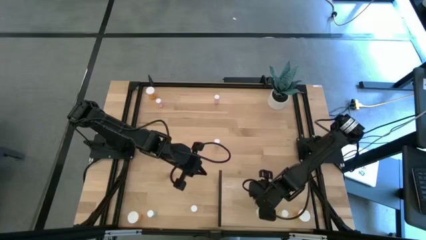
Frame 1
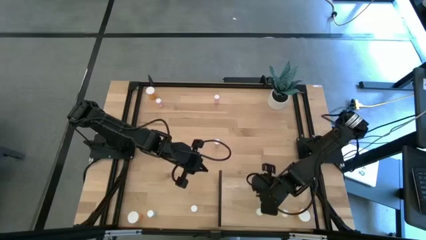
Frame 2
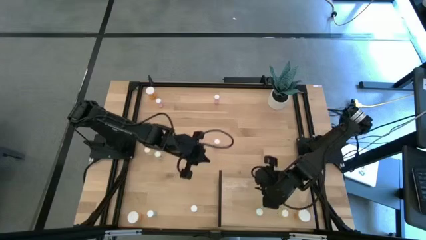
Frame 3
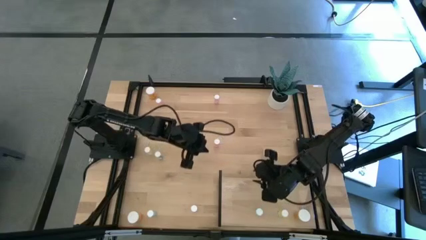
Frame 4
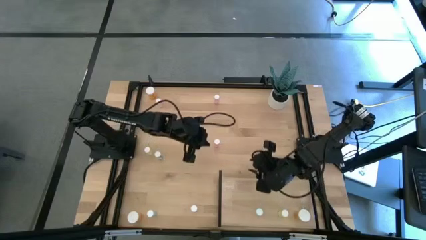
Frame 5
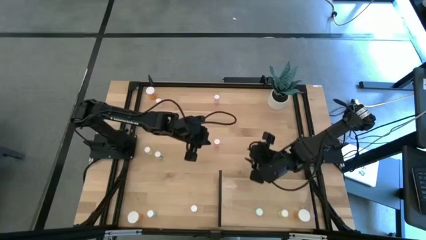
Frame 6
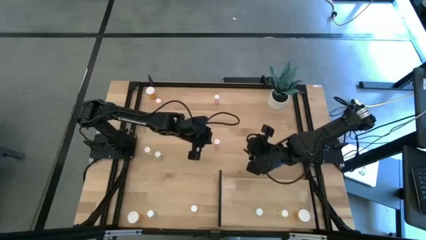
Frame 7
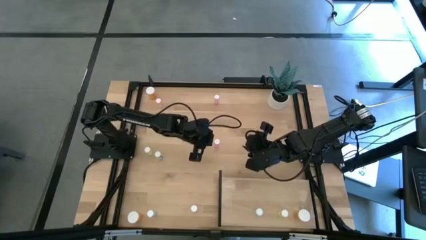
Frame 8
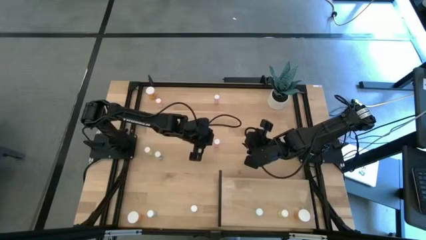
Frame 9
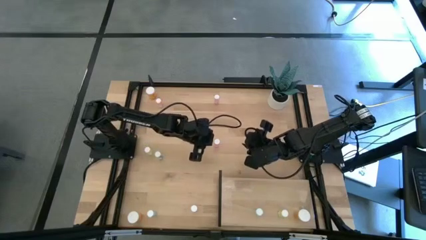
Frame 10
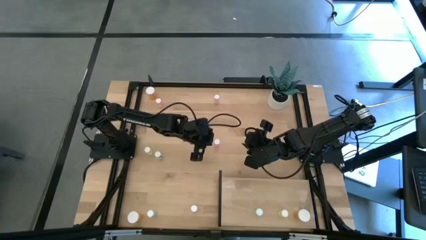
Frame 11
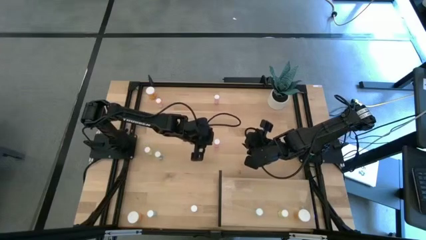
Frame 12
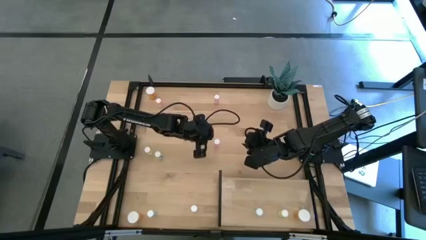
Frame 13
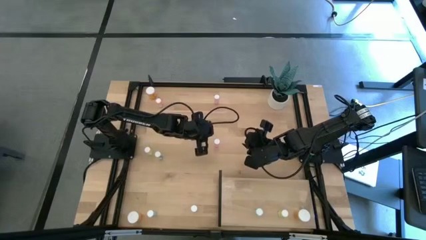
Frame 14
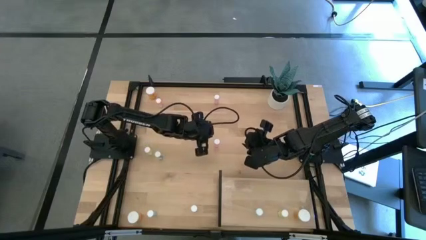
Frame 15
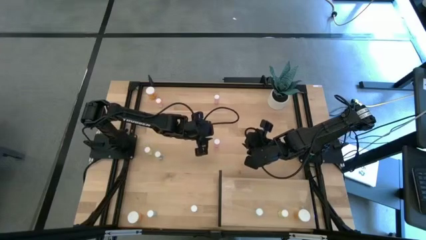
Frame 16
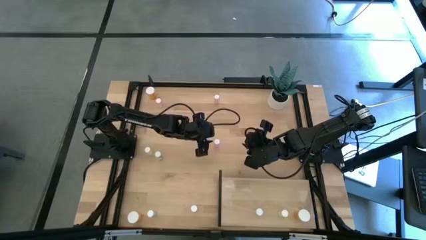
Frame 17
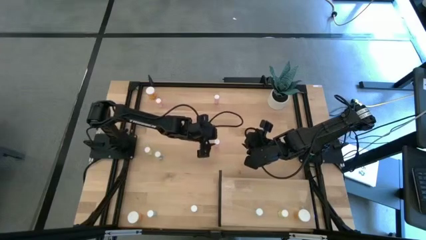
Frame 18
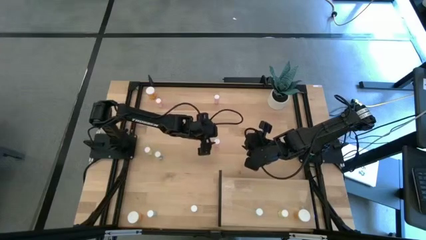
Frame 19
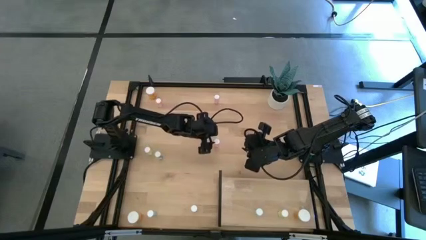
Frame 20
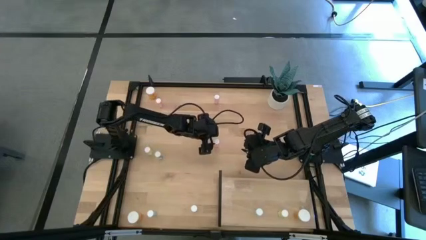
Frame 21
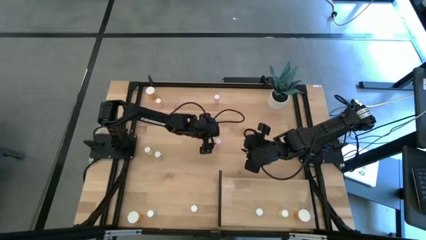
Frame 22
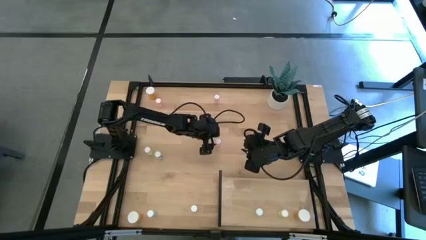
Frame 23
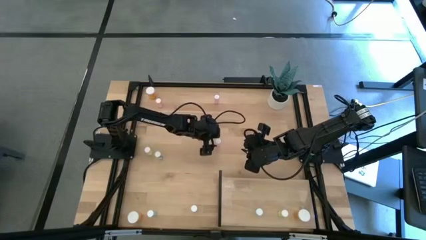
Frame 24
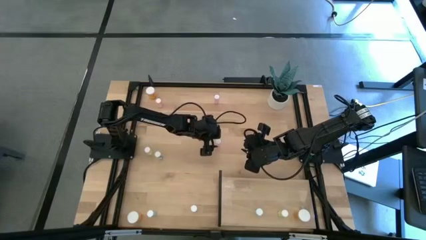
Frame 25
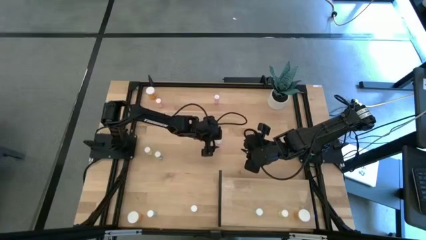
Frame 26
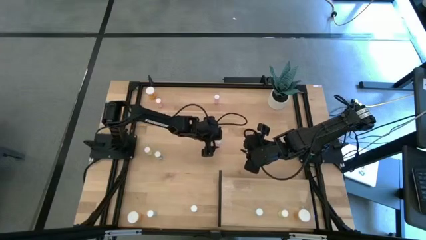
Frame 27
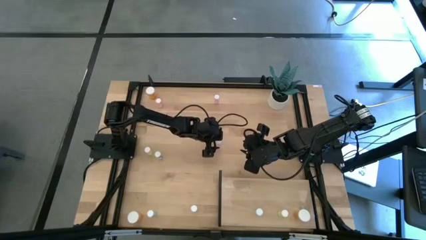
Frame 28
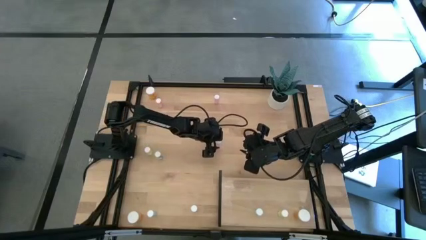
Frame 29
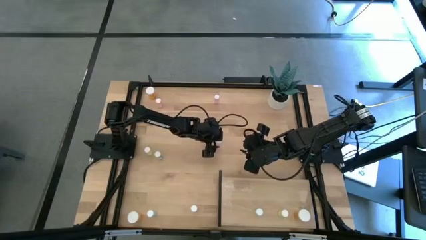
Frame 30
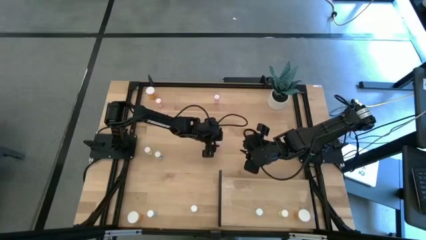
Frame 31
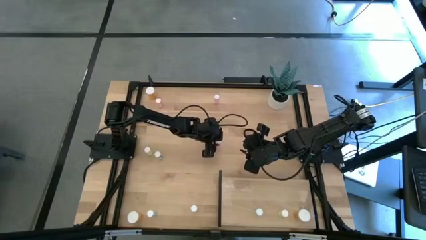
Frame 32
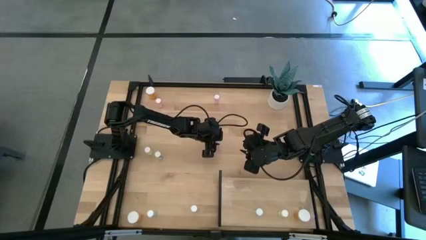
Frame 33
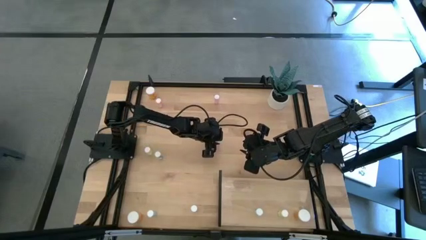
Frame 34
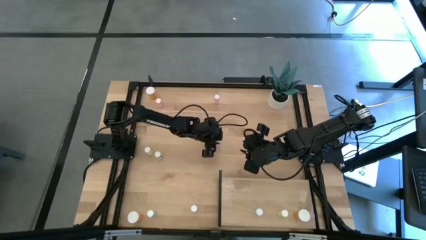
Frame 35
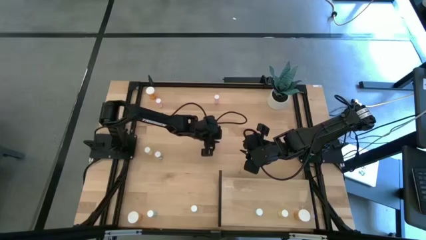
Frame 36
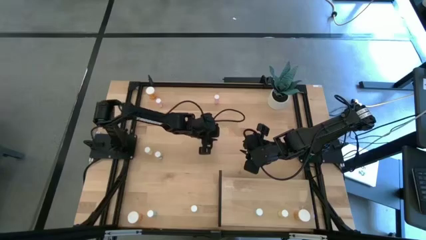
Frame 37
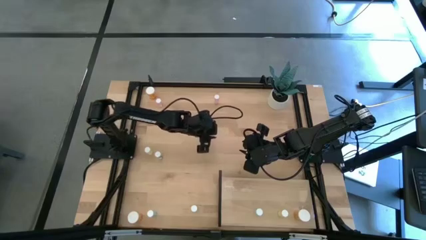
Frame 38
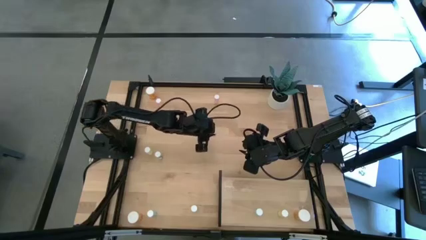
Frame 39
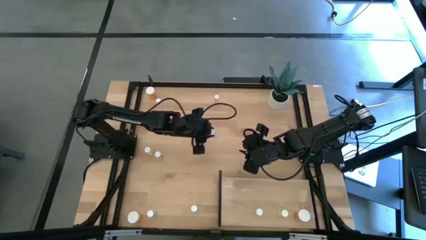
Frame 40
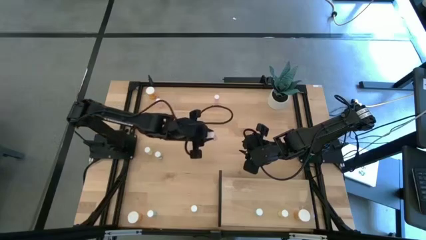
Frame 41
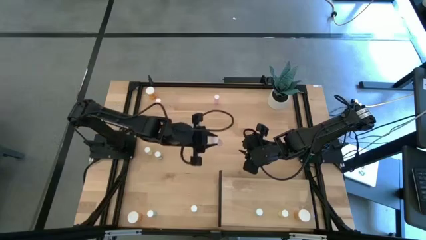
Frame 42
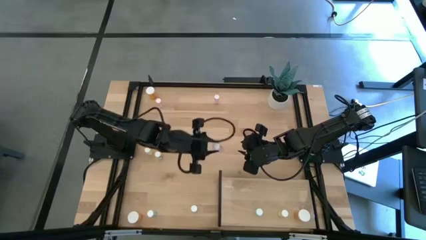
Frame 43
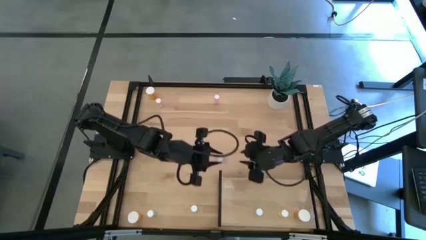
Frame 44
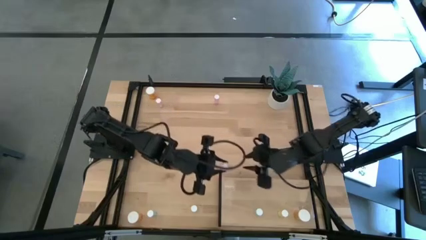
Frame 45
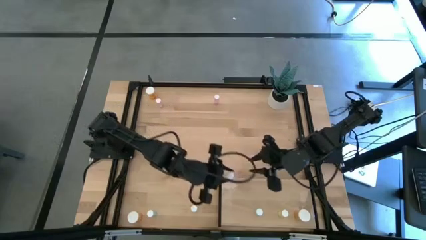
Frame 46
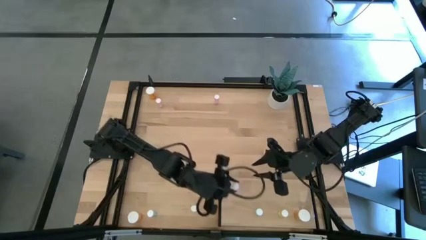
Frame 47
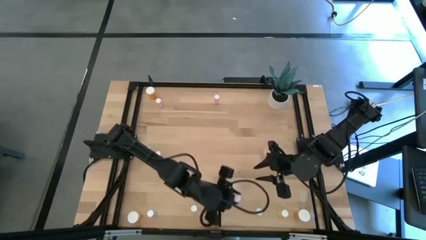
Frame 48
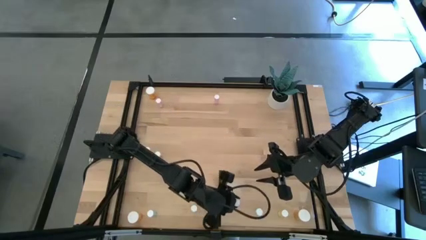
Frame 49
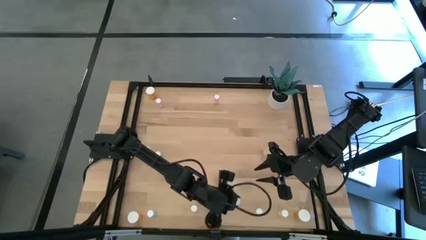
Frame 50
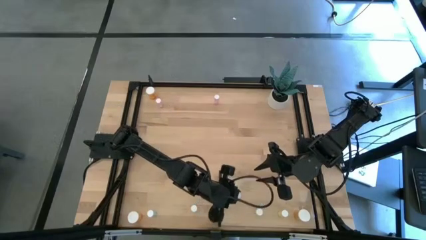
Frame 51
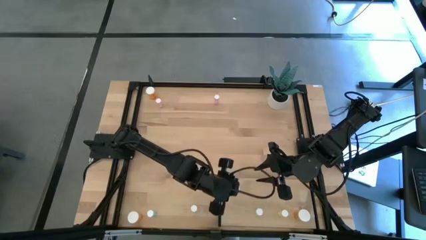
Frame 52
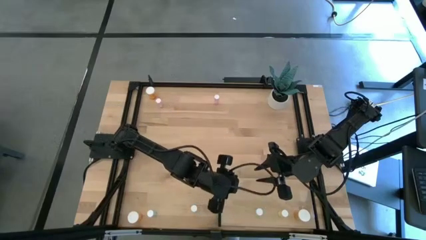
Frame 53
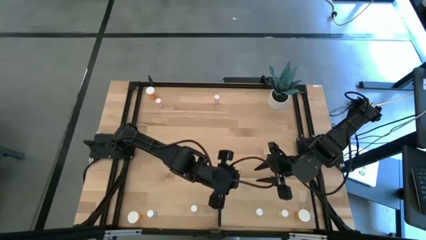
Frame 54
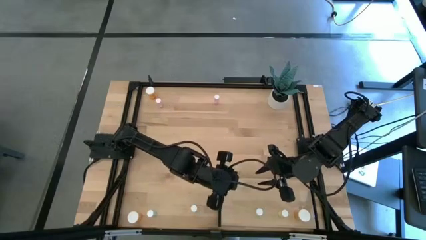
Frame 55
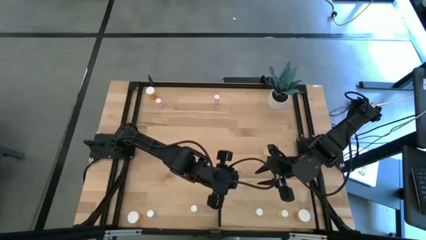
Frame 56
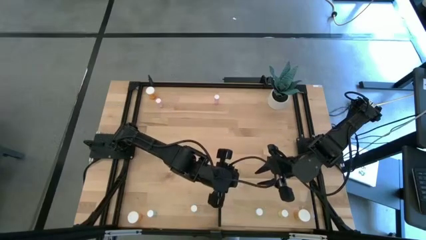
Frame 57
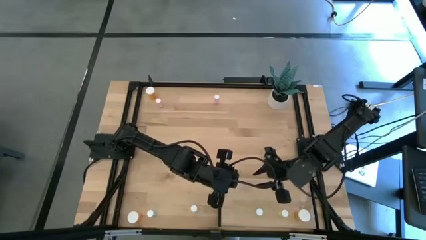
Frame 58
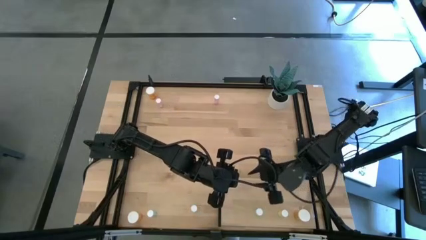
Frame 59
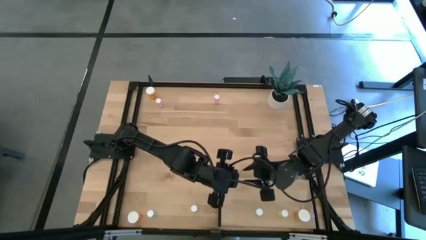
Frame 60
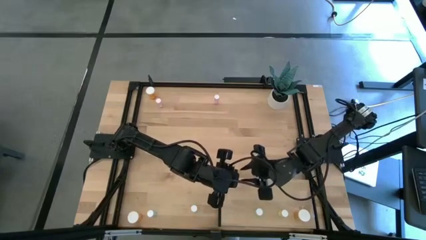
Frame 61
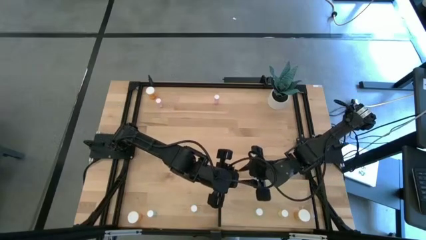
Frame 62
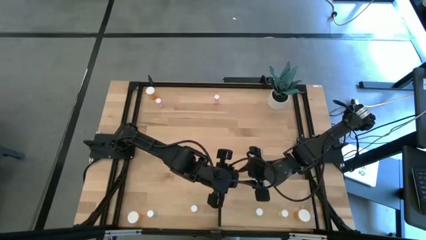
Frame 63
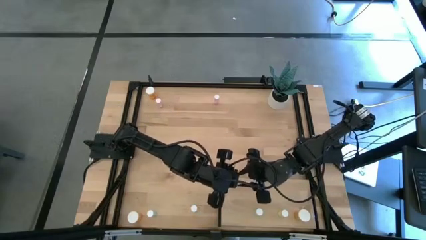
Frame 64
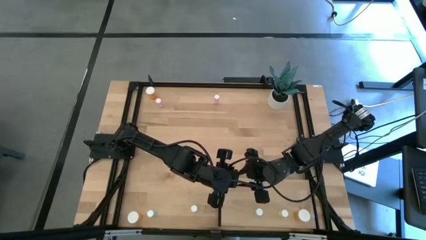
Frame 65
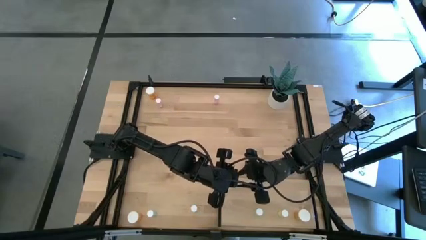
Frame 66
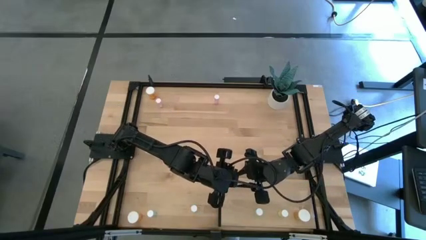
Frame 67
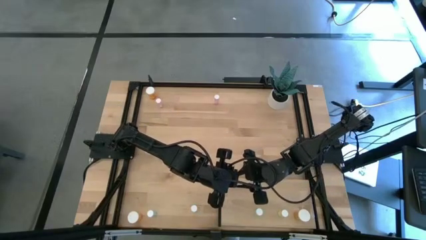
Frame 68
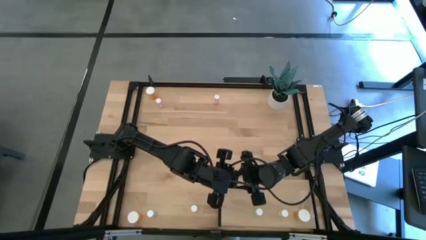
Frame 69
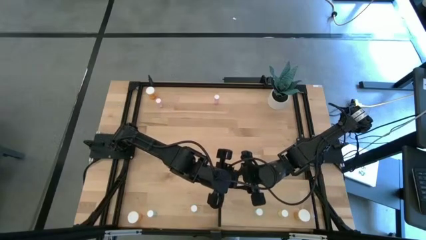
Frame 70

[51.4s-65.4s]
Task: Pick and place medicine bottles onto shelf by color
Put the middle pink pill bottle on the shelf

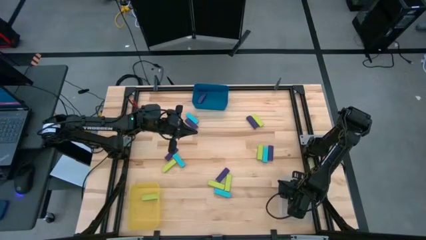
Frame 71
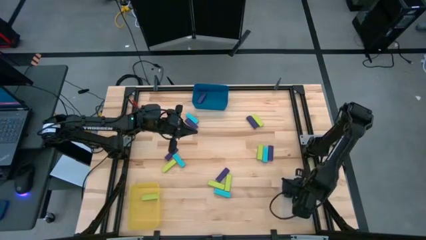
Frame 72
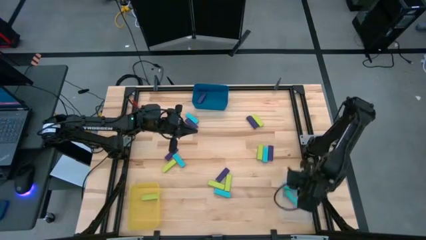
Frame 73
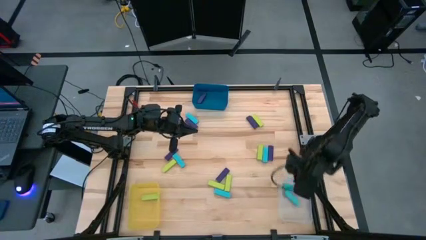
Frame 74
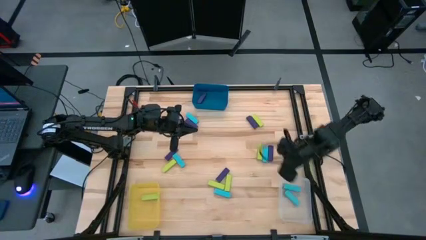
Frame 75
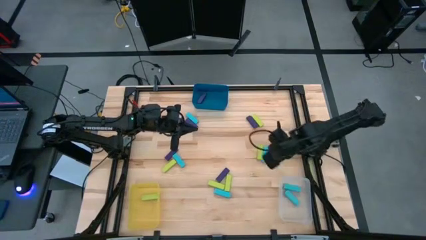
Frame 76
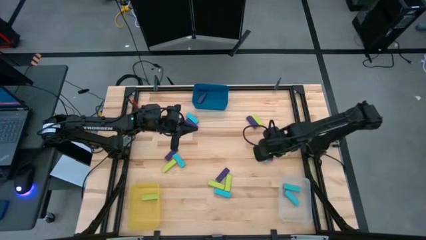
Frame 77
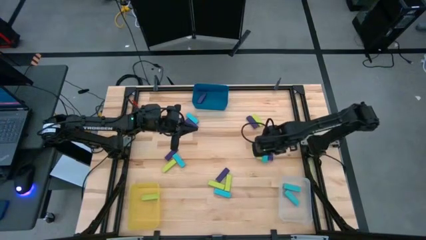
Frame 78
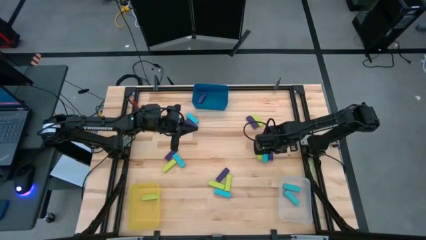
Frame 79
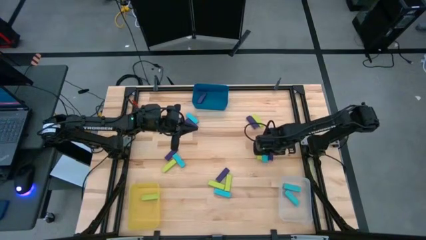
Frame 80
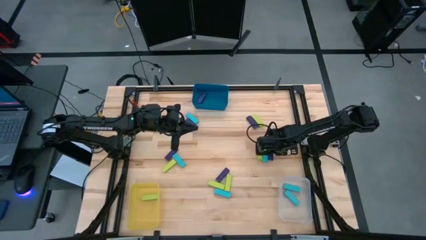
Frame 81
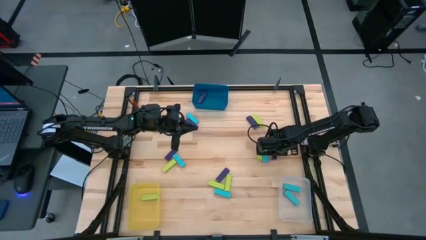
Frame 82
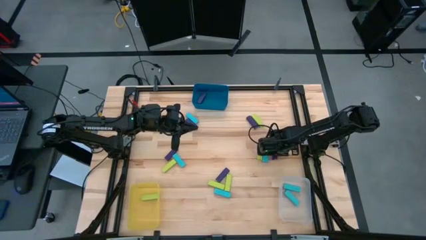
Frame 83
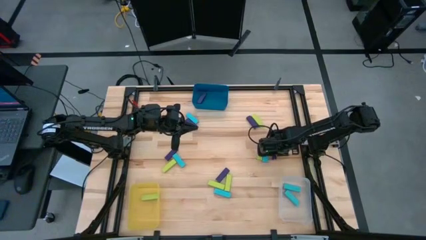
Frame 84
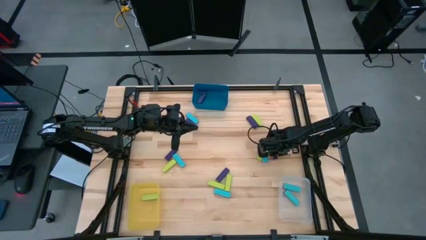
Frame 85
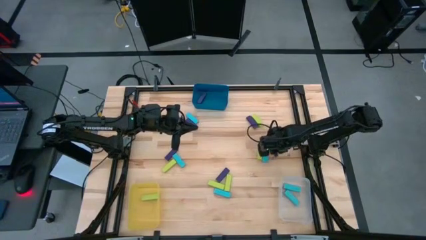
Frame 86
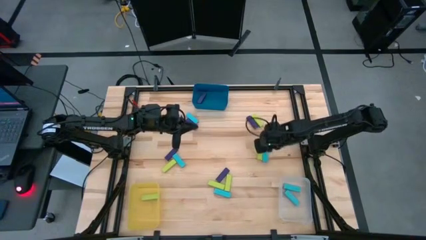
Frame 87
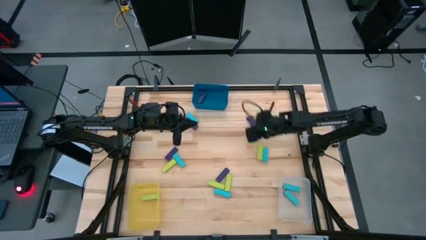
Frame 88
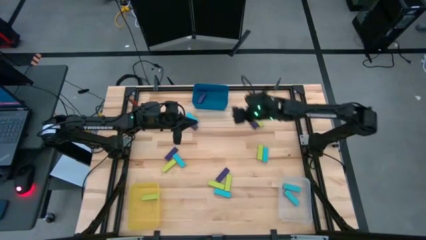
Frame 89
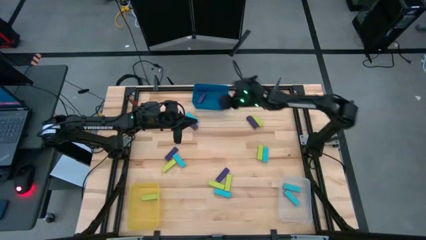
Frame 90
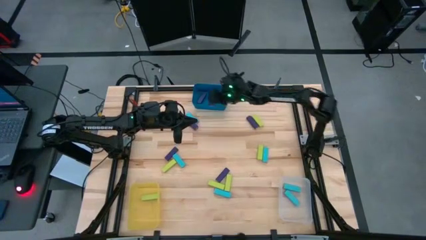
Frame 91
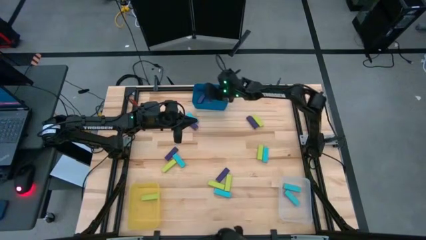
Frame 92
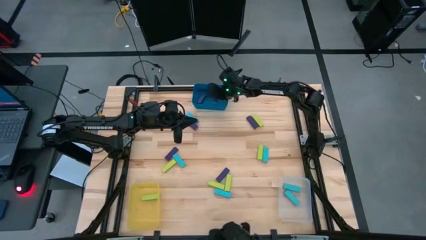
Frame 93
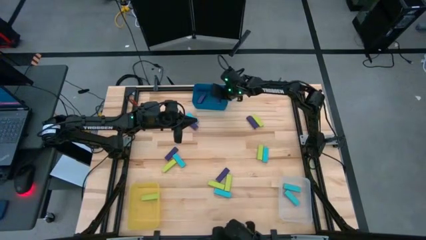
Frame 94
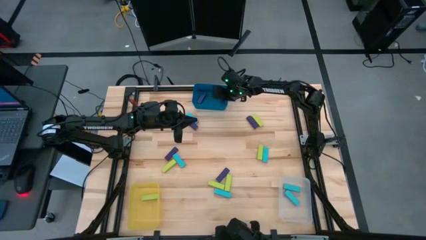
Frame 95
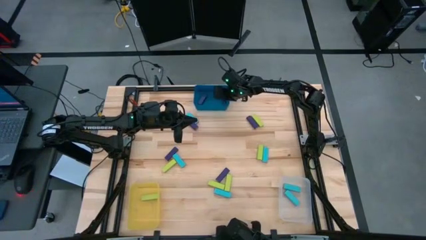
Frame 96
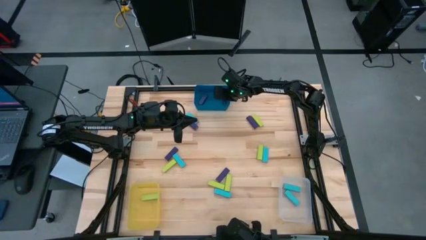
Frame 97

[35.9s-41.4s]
Task: Sort blocks
Put the purple block into the blue bin
